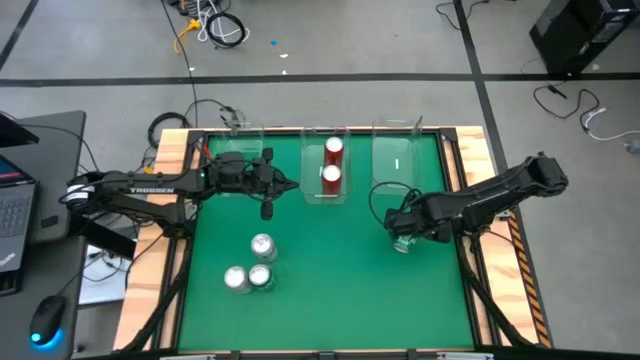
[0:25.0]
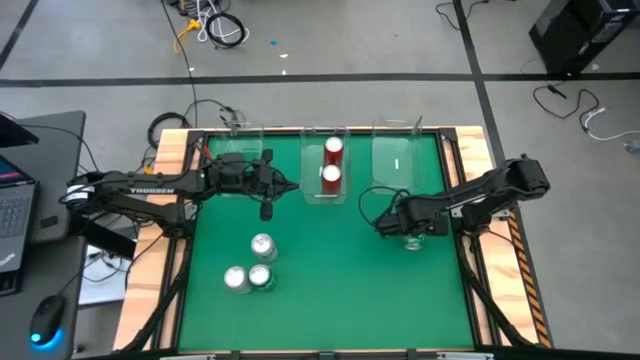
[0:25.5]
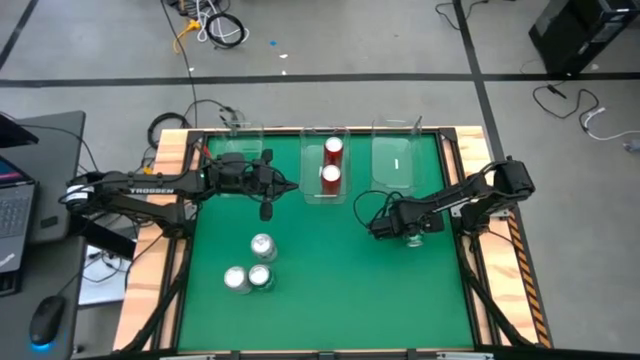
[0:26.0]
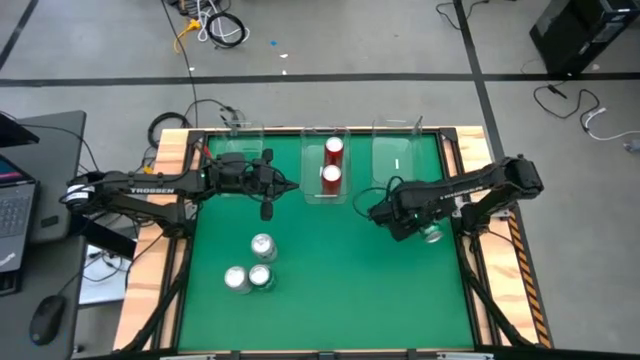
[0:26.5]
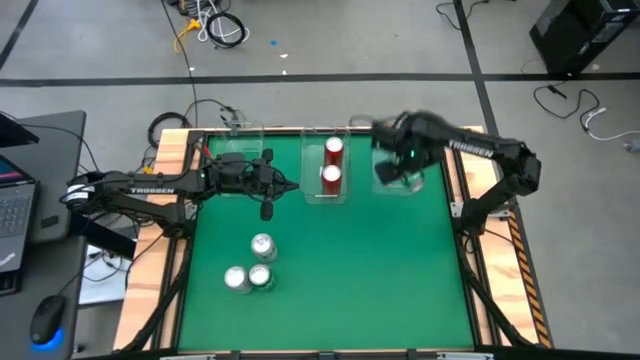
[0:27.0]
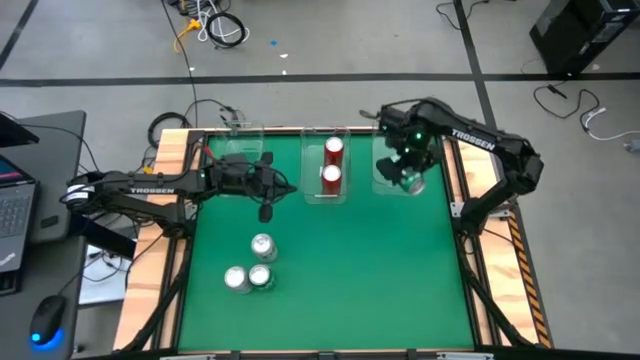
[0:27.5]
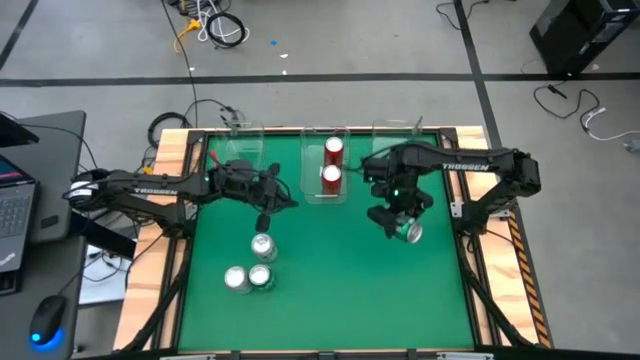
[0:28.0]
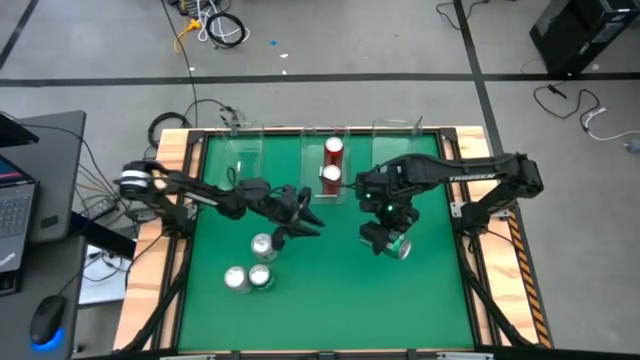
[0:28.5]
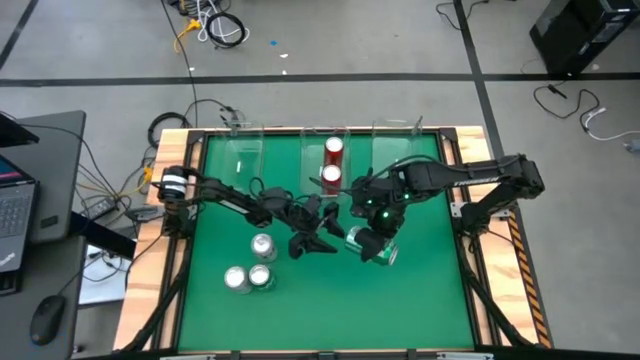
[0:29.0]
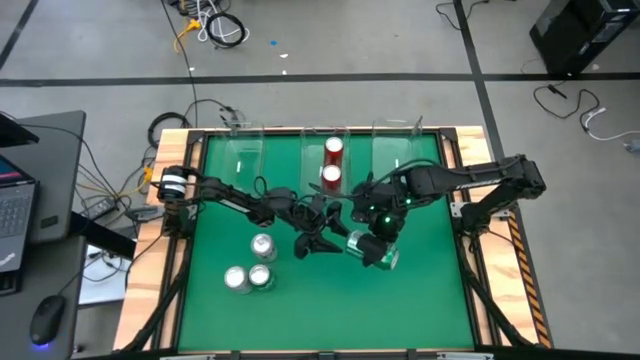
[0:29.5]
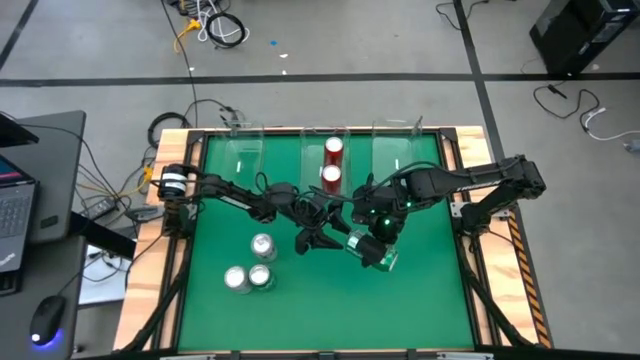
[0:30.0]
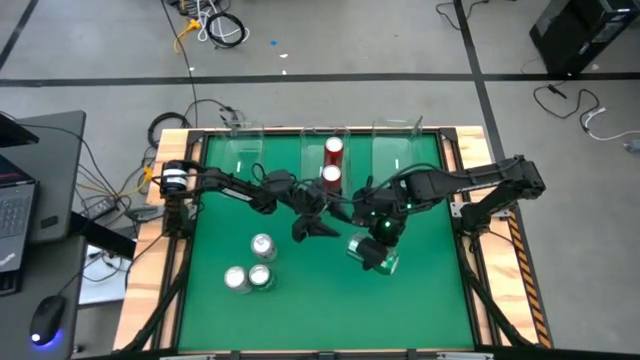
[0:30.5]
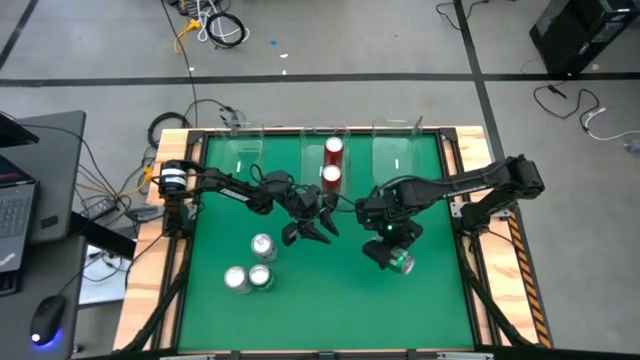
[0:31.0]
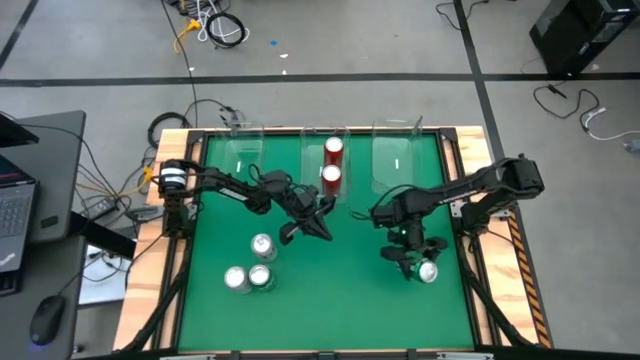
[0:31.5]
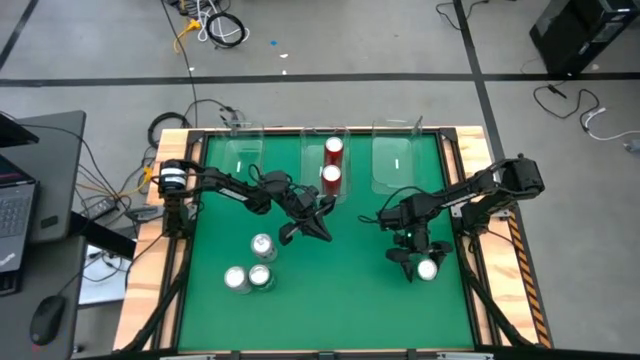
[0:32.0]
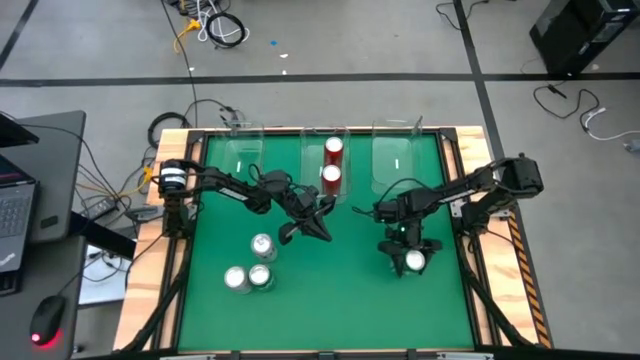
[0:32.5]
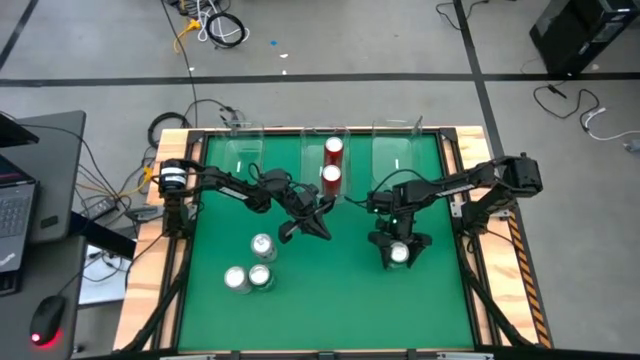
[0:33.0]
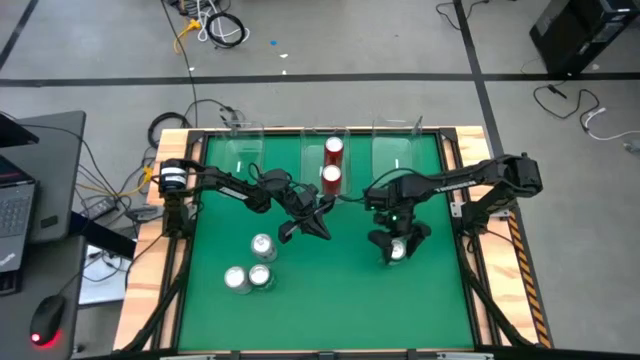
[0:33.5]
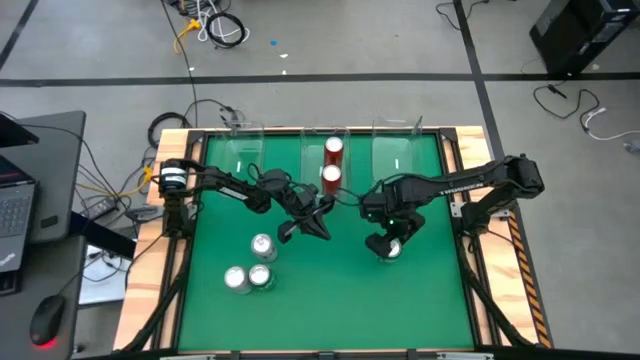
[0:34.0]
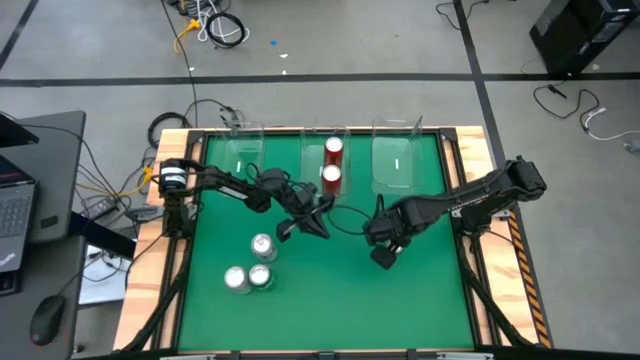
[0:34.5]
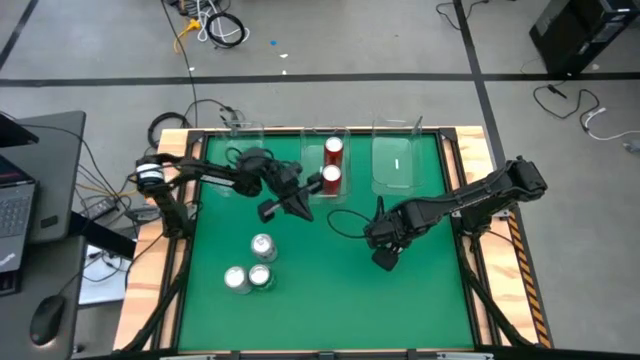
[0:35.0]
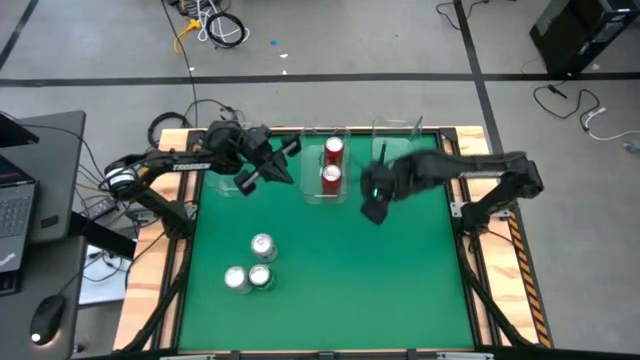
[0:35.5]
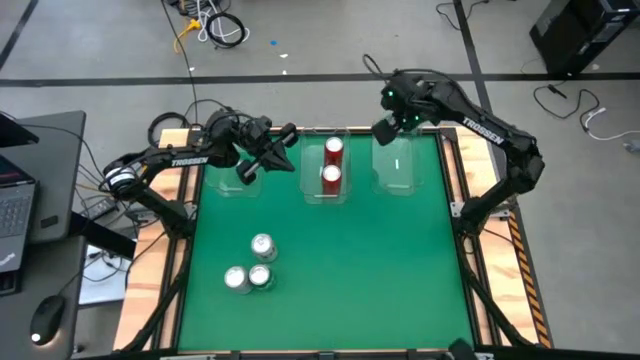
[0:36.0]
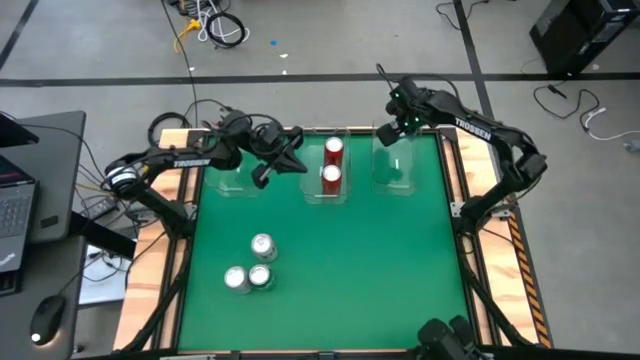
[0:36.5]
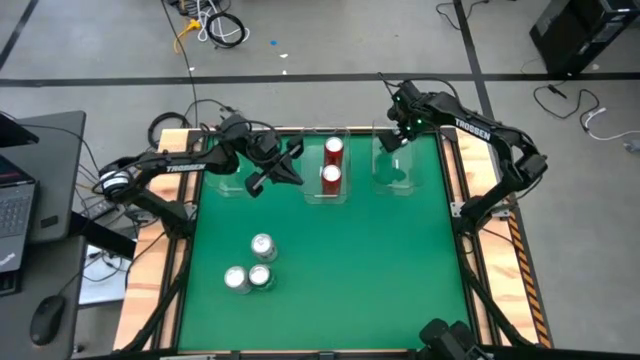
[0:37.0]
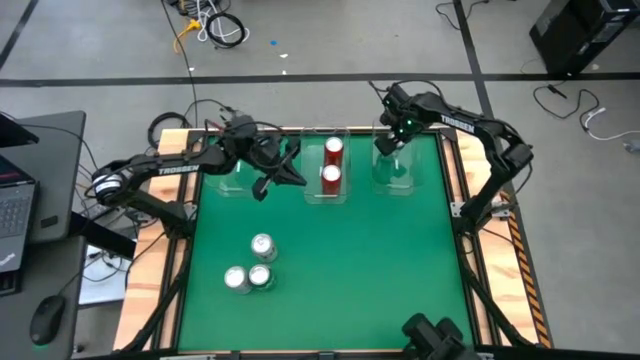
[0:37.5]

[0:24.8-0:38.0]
Task: Sort soda cans
Put the right green soda can into the right transparent bin

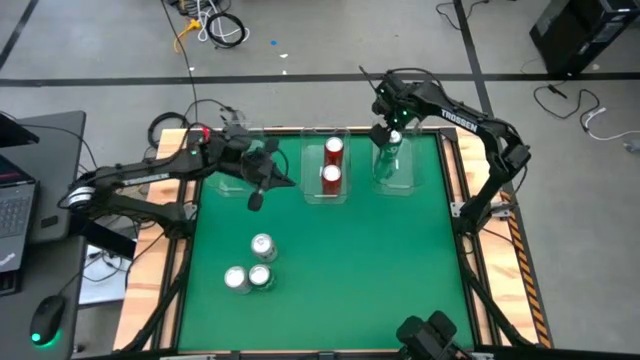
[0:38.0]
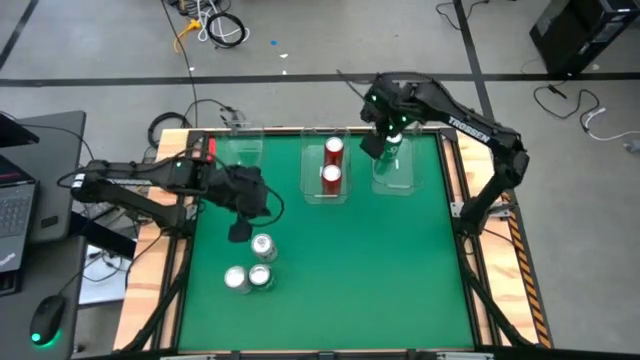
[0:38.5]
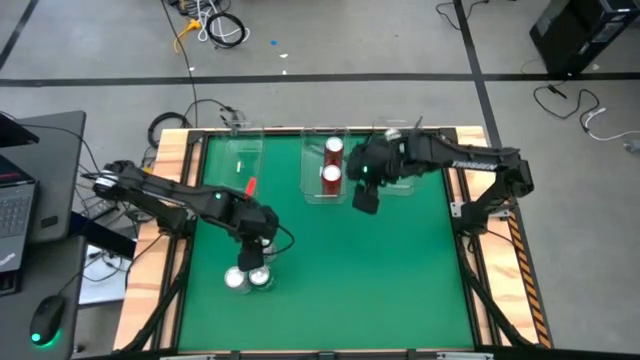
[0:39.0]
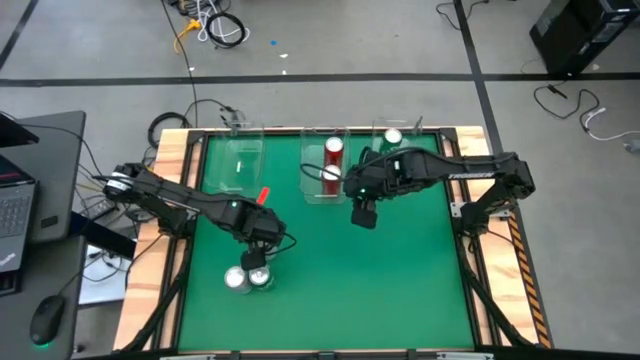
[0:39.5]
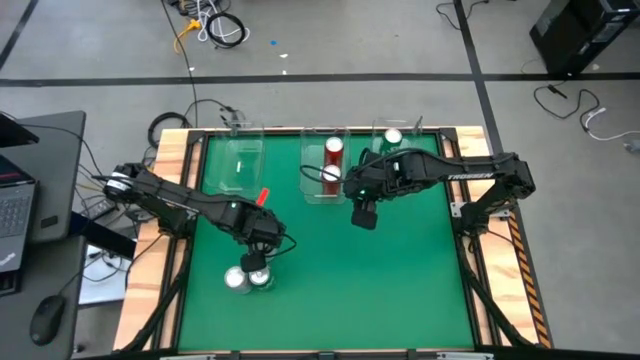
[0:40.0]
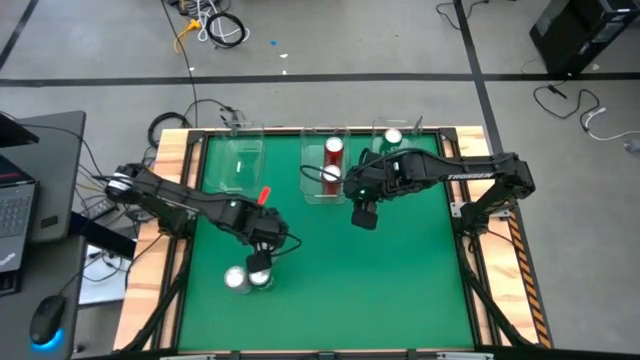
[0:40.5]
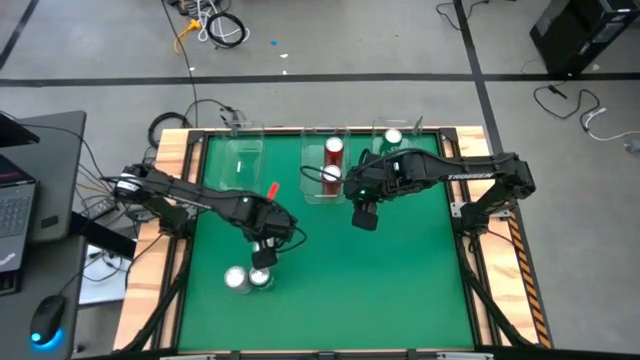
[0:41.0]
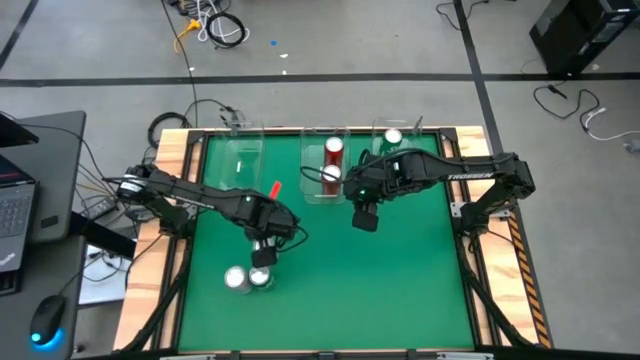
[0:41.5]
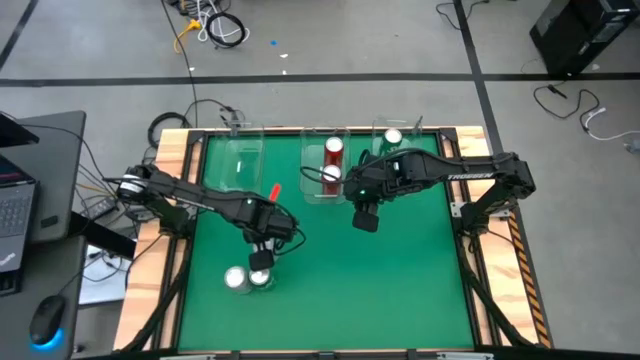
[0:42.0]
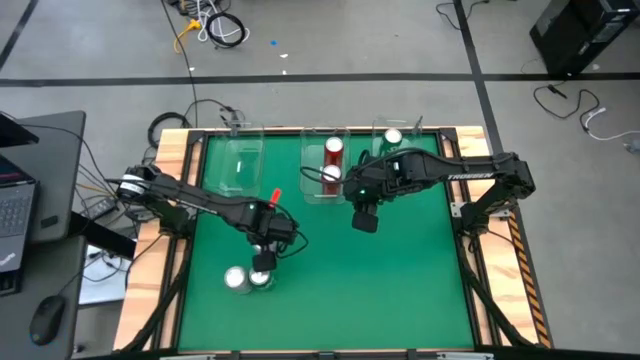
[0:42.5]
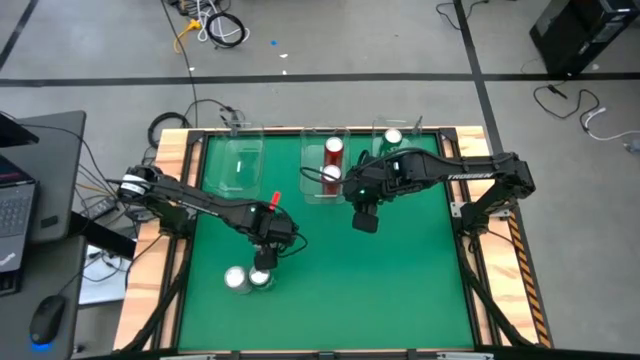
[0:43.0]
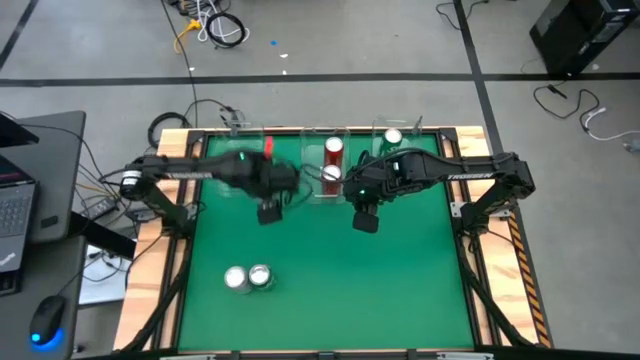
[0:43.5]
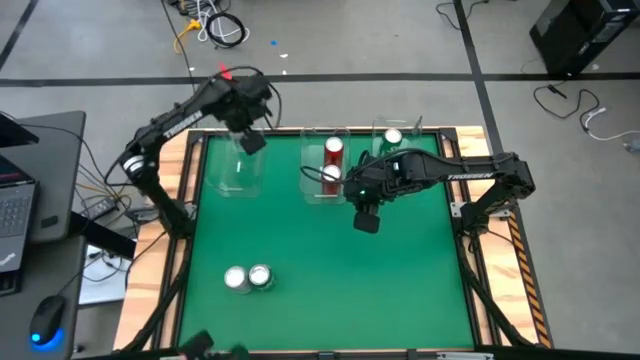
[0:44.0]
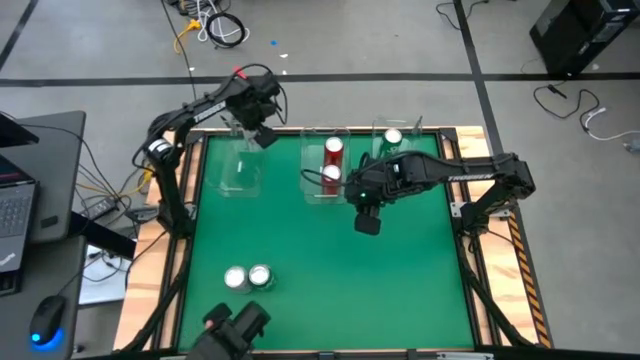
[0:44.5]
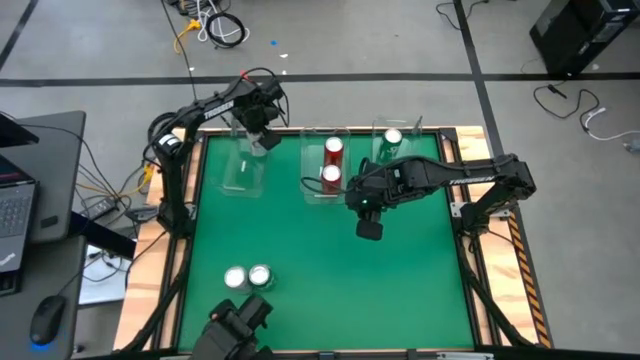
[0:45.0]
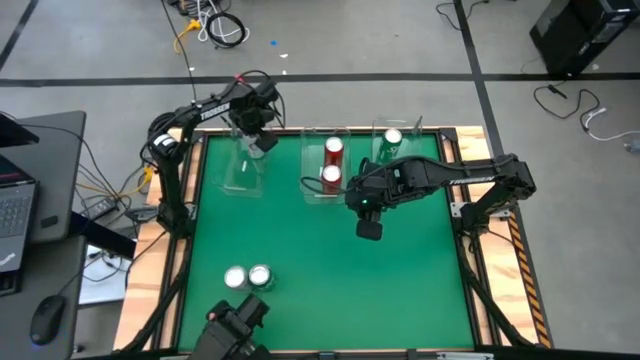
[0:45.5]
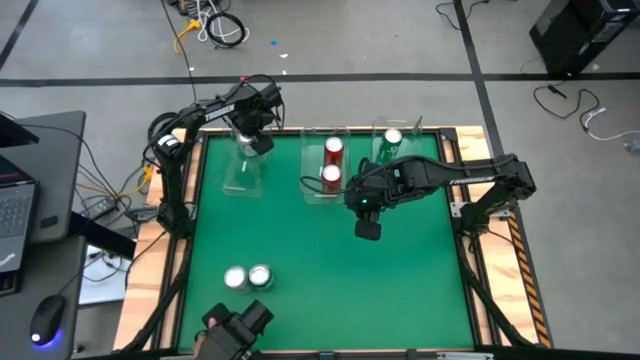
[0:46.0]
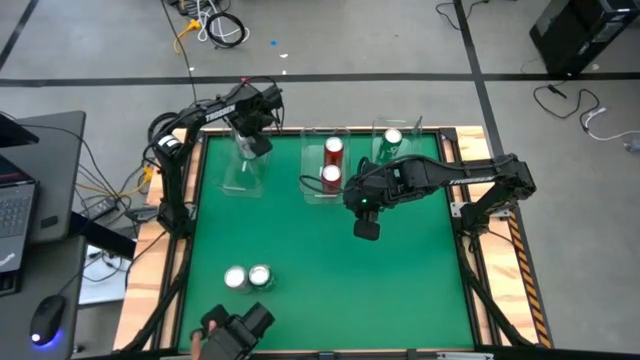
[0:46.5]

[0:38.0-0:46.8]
Put the top red-silver soda can into the left transparent bin
